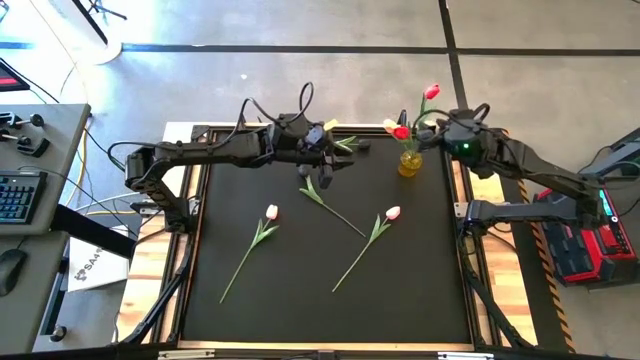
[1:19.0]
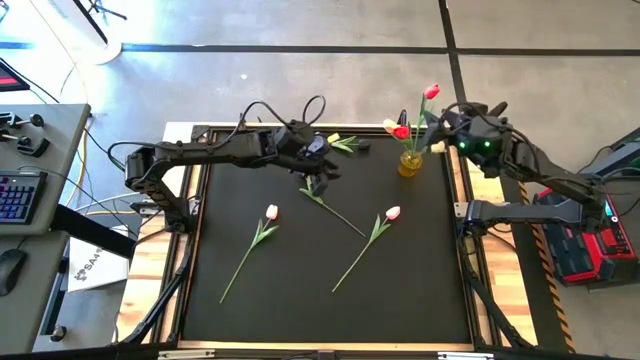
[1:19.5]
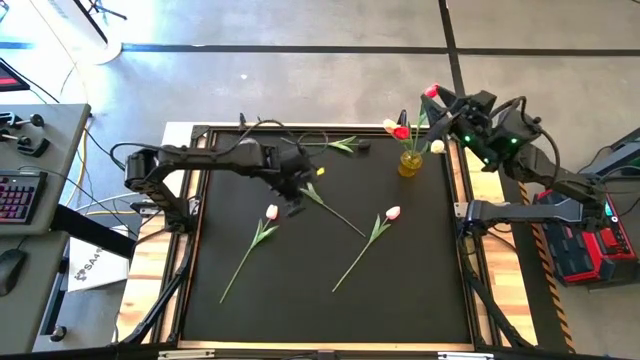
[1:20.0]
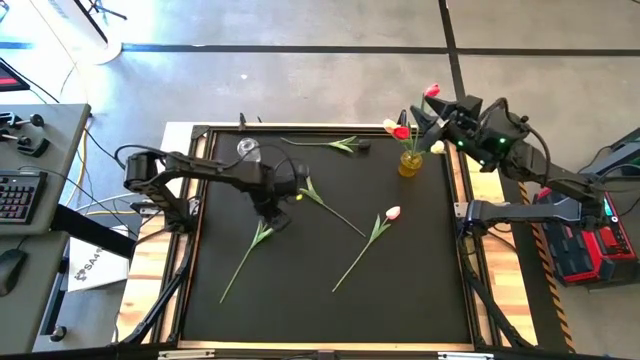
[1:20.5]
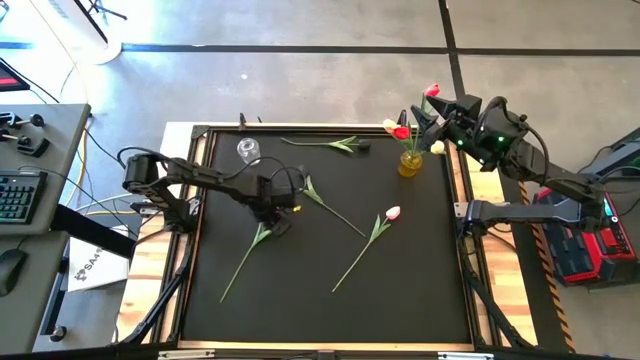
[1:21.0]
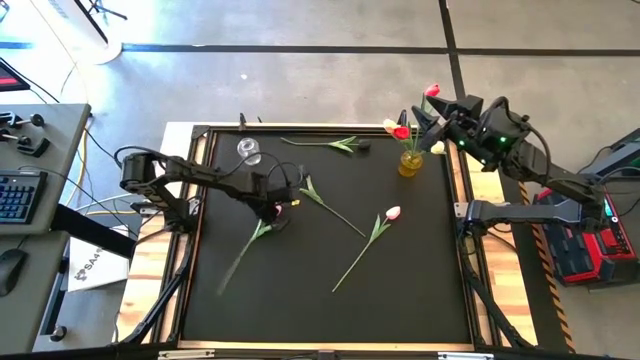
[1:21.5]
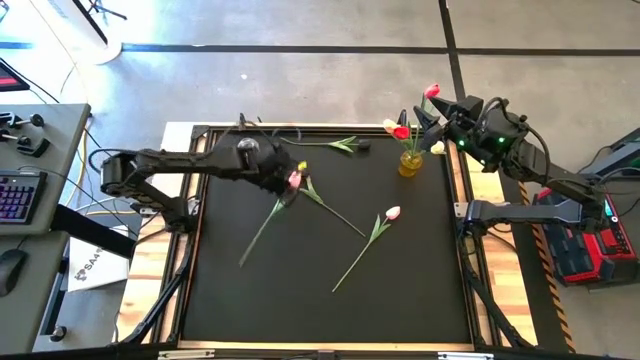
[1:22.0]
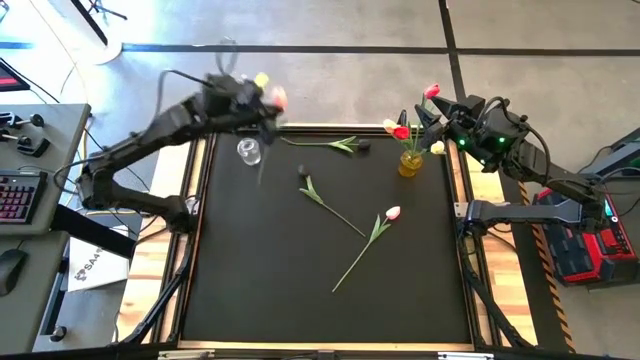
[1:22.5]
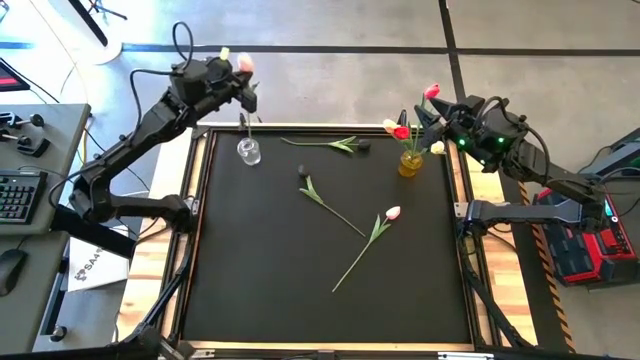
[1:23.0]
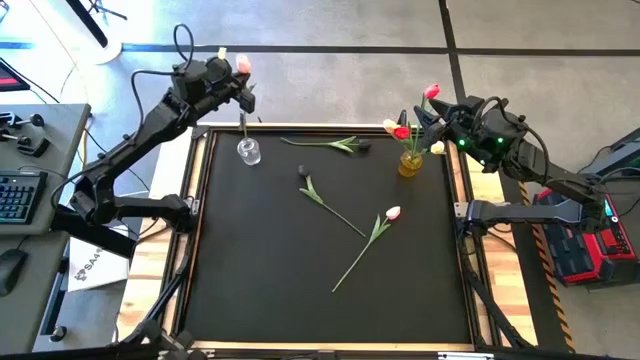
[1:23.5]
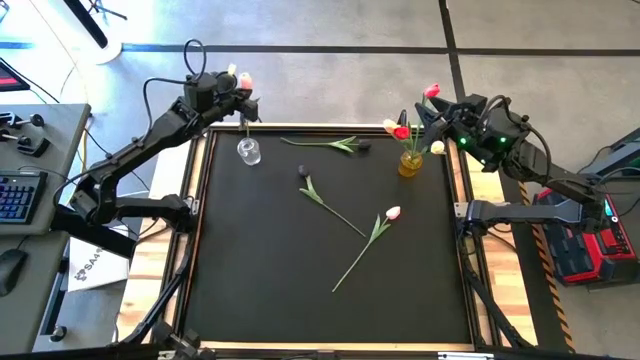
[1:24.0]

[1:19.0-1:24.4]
Task: Sort flowers into vase by color
Put the left pink flower into the transparent flower vase

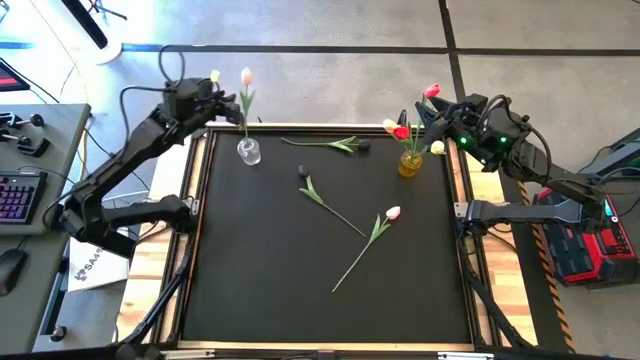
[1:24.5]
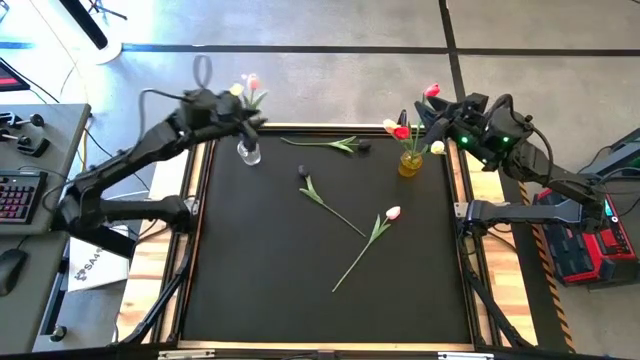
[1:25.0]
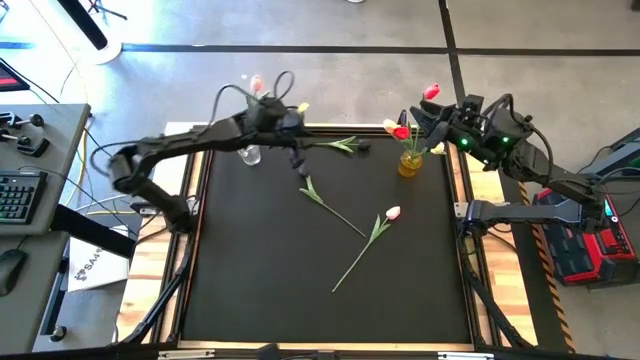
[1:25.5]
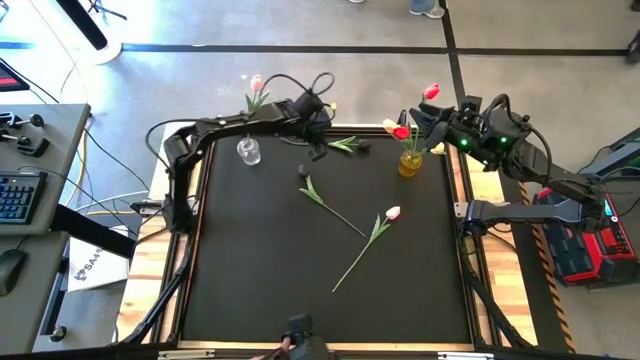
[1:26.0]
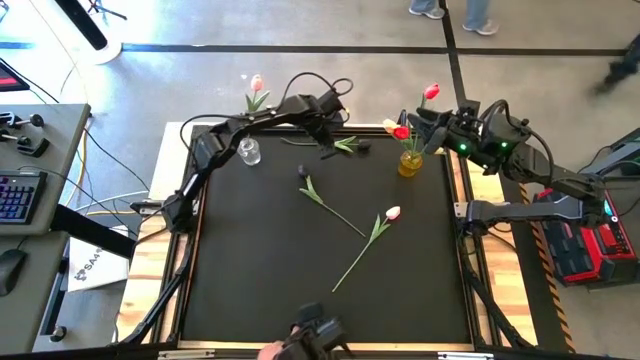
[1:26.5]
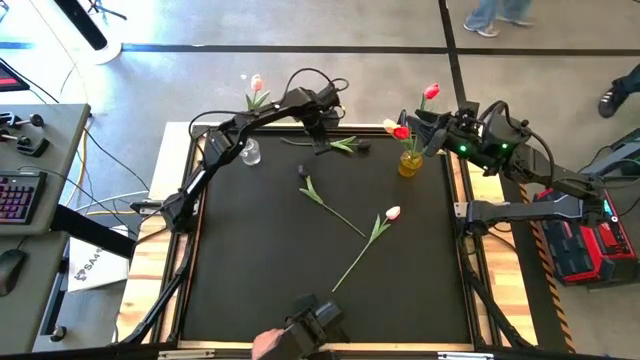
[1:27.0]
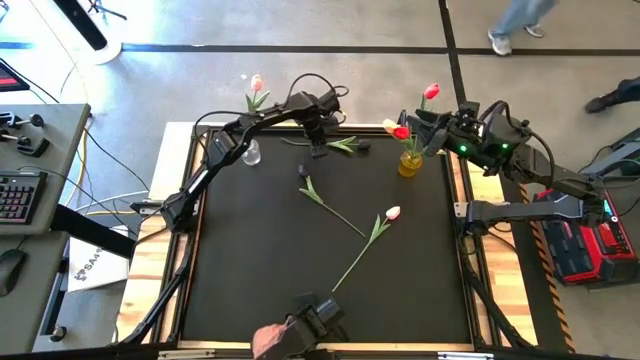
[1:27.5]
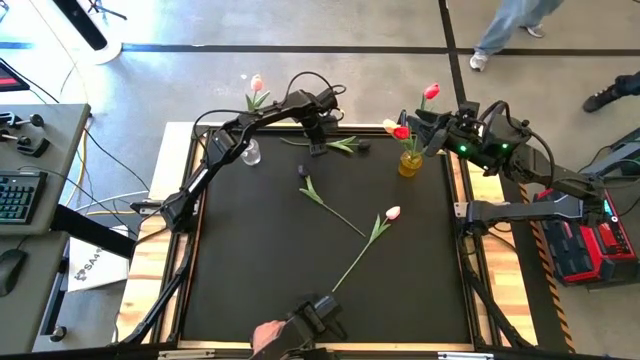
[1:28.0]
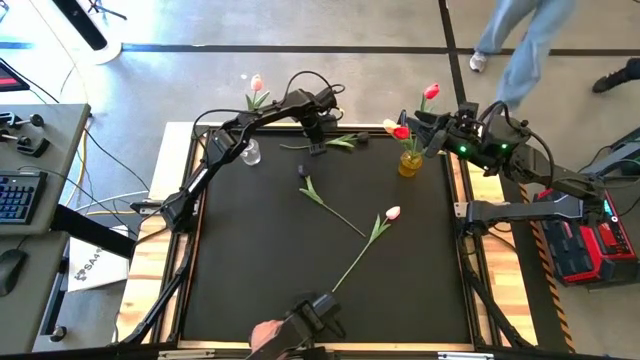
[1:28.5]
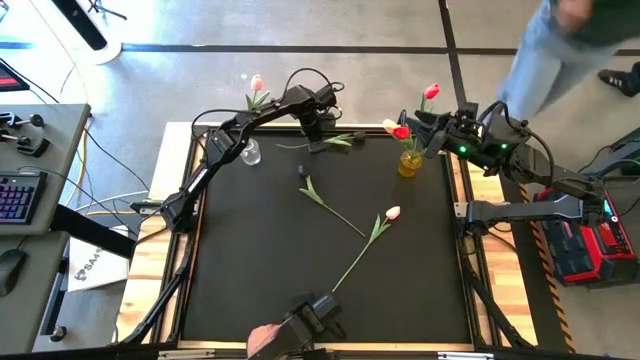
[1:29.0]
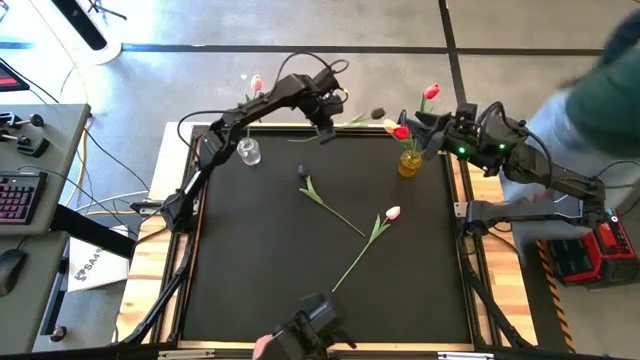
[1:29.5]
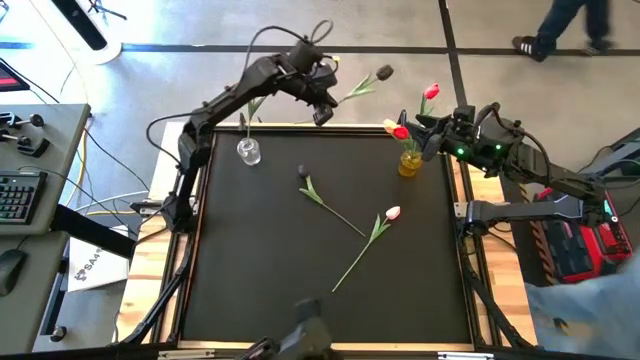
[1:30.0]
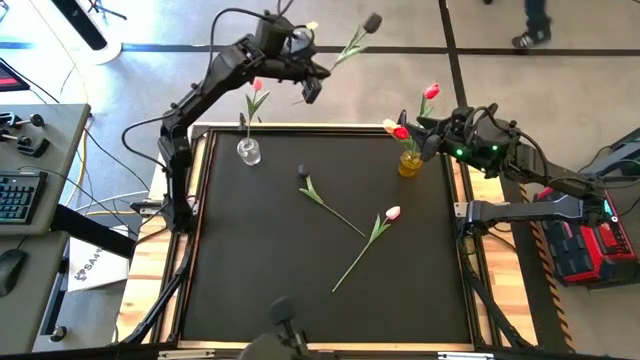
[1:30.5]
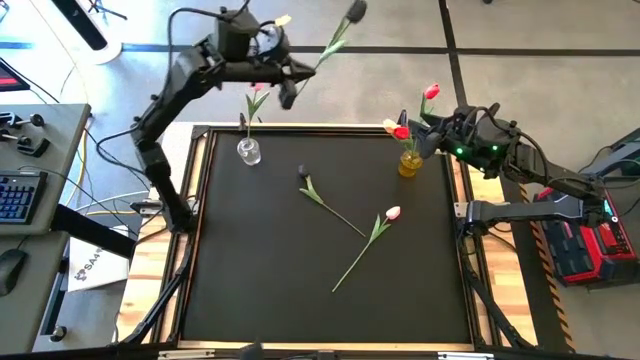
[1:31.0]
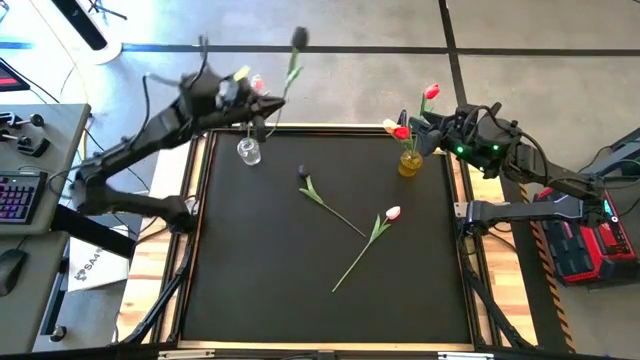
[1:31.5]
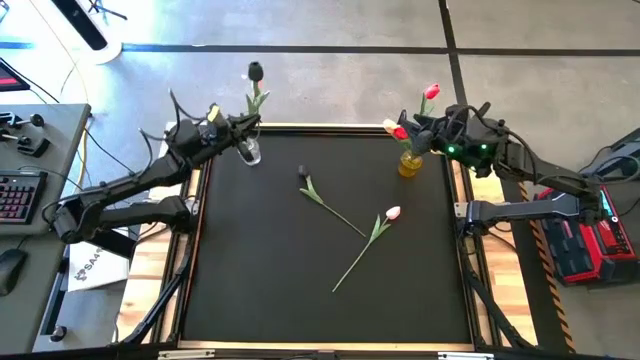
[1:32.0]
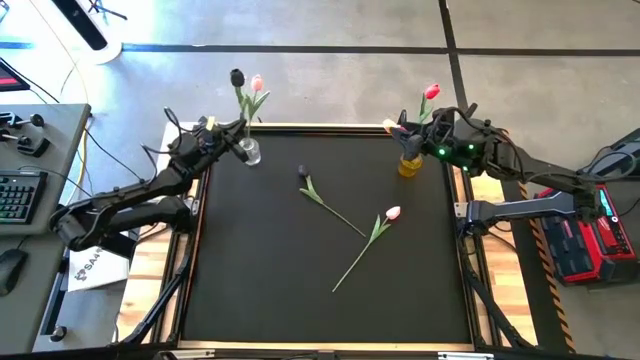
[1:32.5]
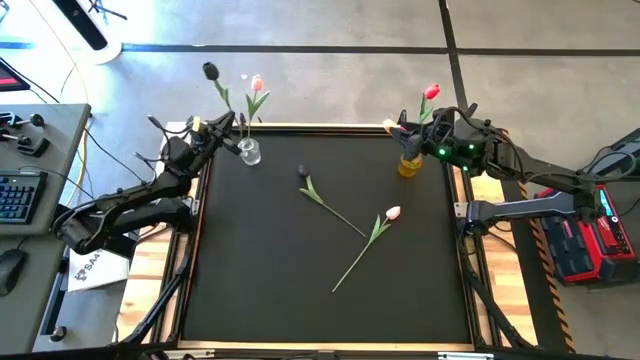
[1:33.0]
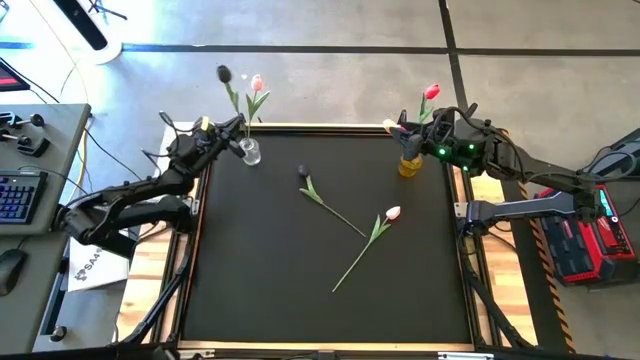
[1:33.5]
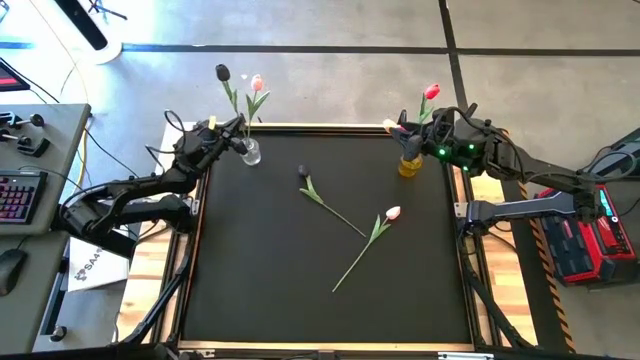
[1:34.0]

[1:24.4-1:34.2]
Put the top black flower into the transparent flower vase

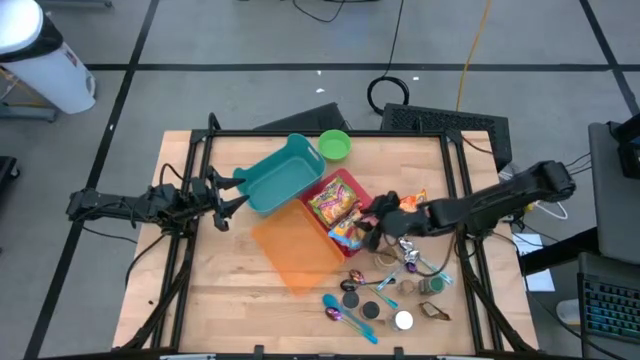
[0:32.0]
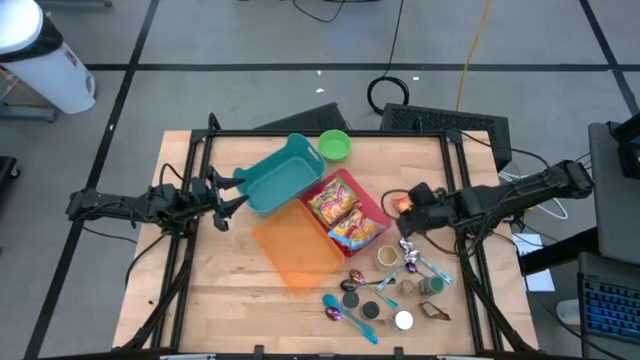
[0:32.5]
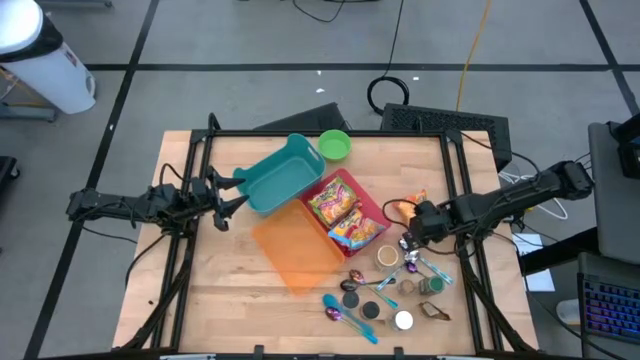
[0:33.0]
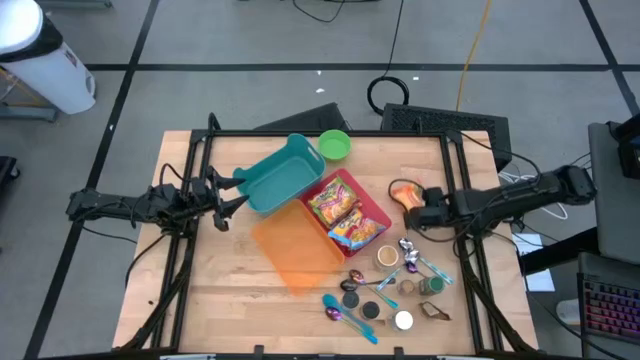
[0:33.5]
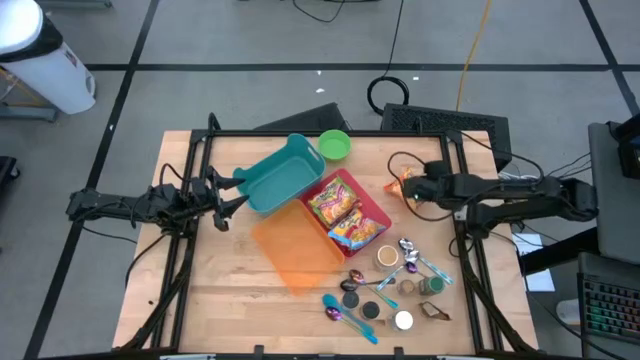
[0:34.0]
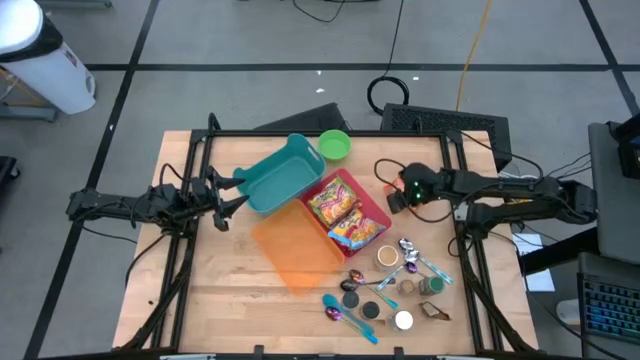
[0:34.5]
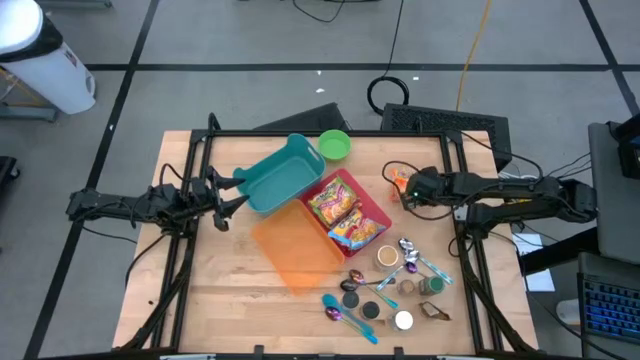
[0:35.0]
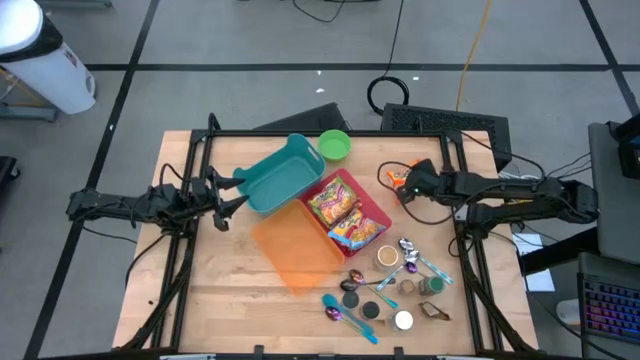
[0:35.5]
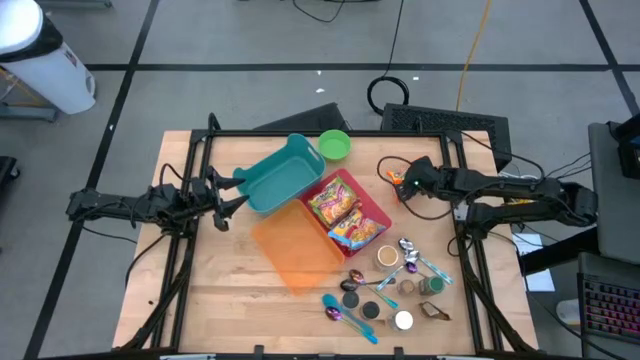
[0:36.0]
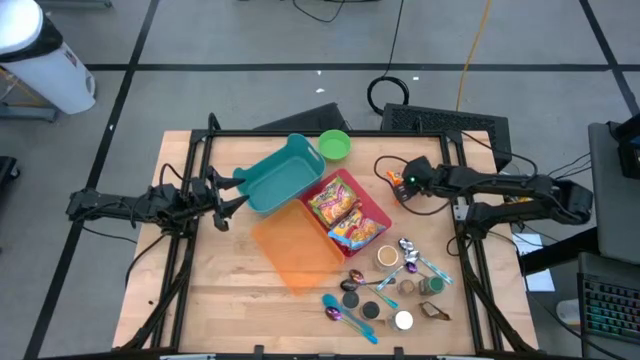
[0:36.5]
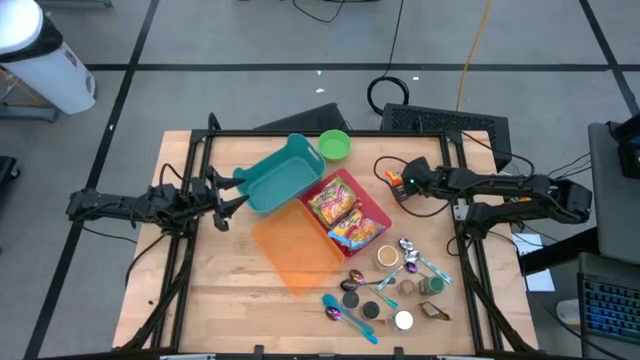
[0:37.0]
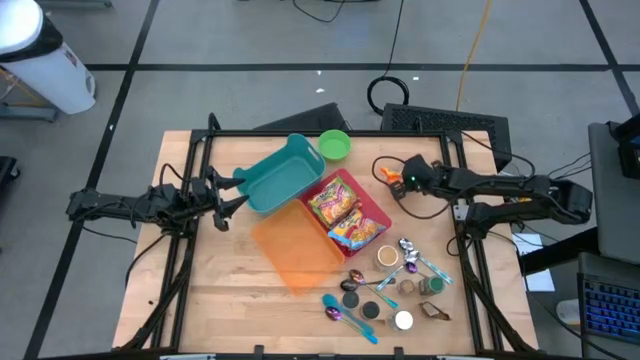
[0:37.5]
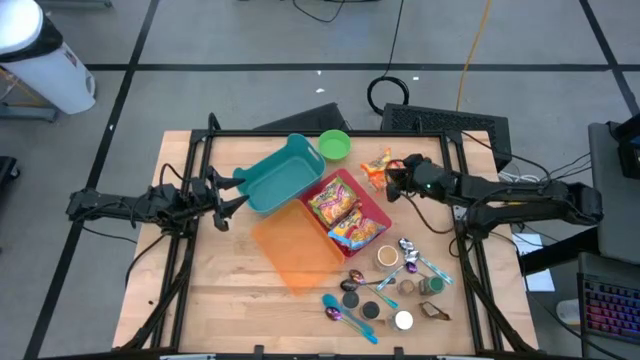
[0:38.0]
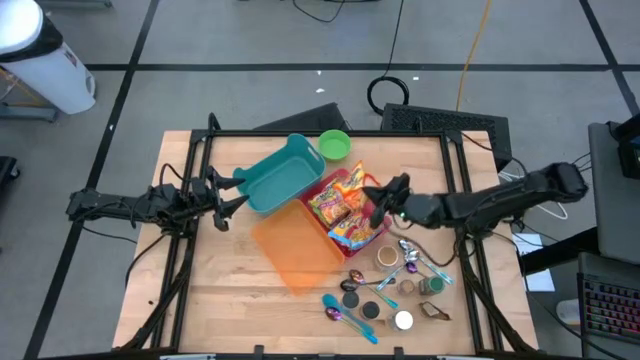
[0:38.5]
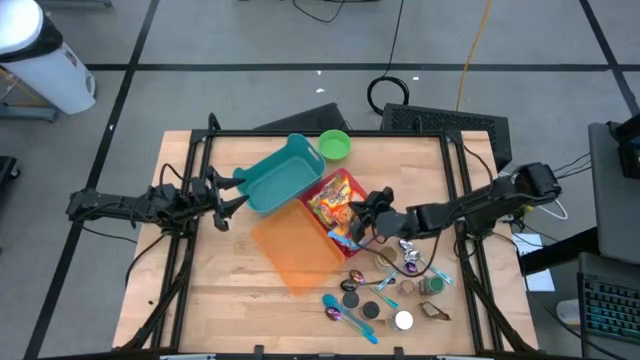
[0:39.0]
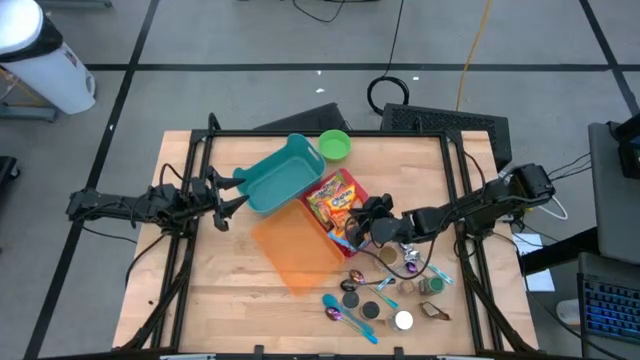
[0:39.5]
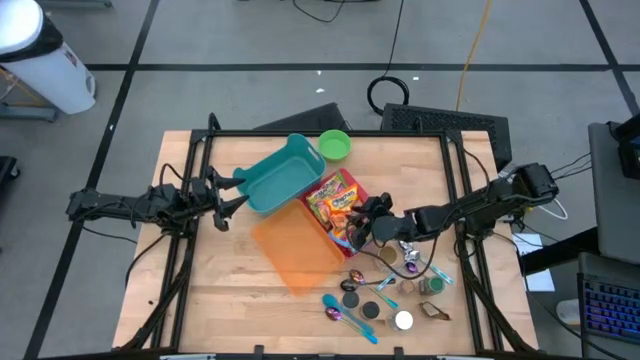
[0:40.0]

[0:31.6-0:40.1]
Task: Pick & Place Food Item
Put the orange noodle pack into the red bin
